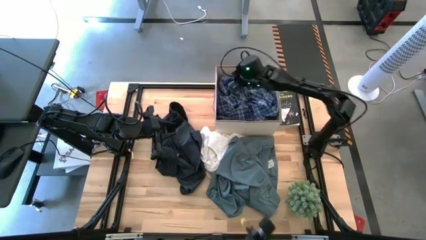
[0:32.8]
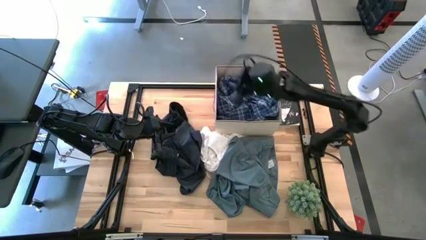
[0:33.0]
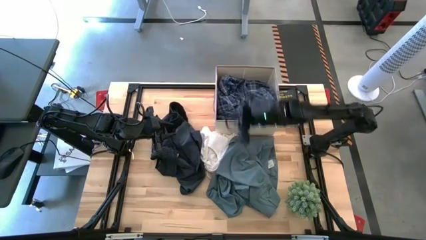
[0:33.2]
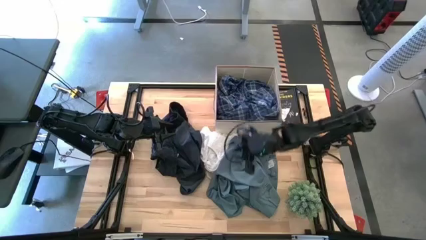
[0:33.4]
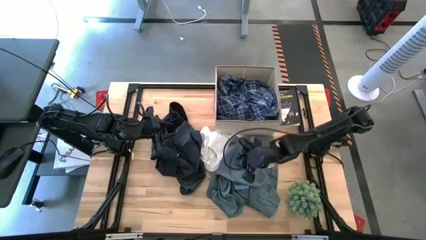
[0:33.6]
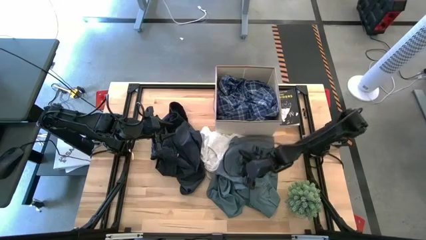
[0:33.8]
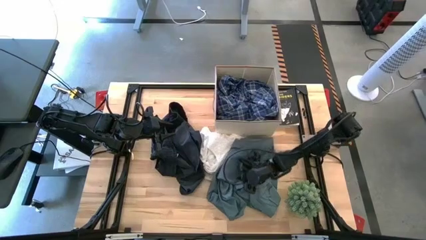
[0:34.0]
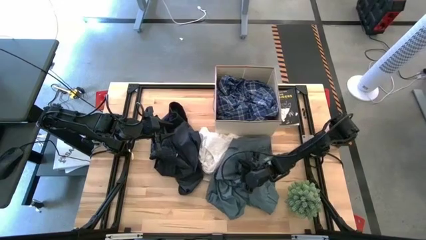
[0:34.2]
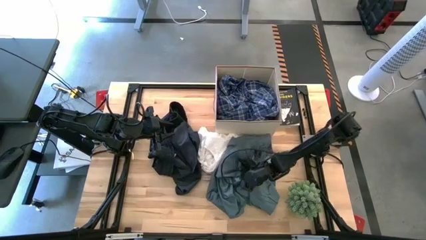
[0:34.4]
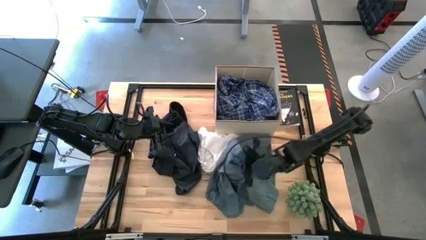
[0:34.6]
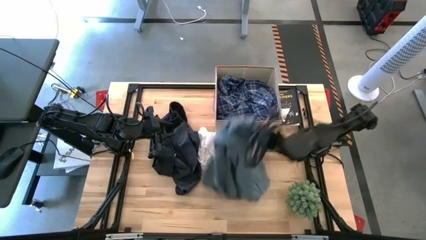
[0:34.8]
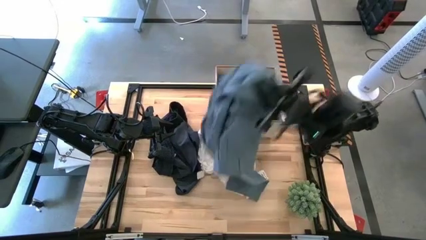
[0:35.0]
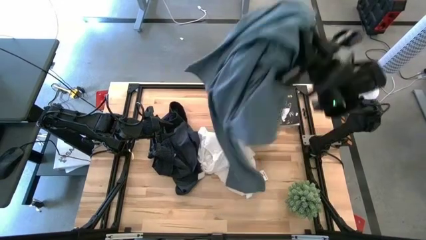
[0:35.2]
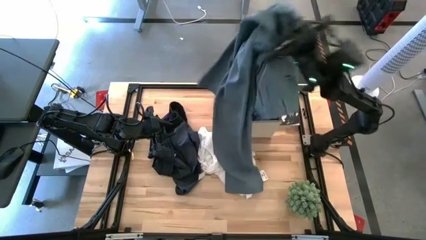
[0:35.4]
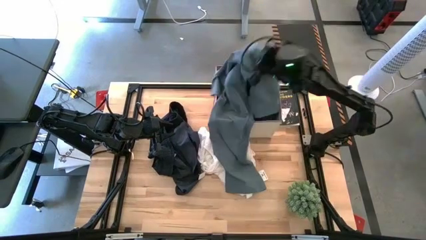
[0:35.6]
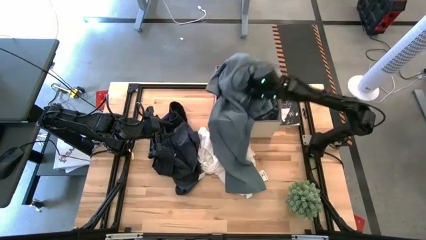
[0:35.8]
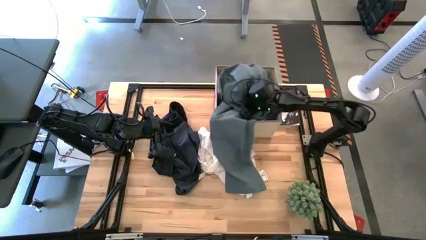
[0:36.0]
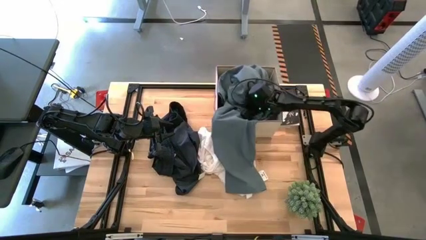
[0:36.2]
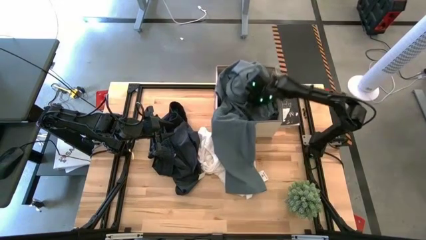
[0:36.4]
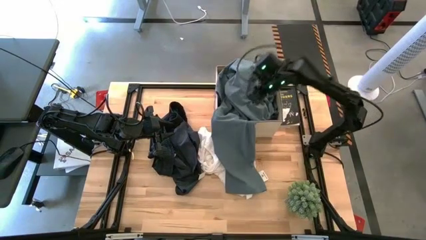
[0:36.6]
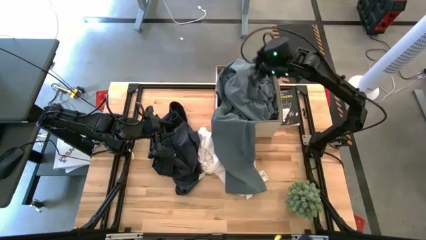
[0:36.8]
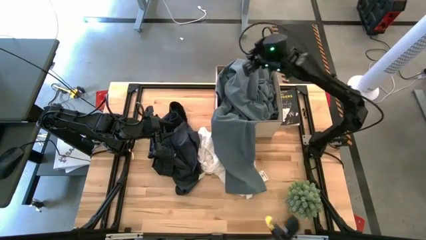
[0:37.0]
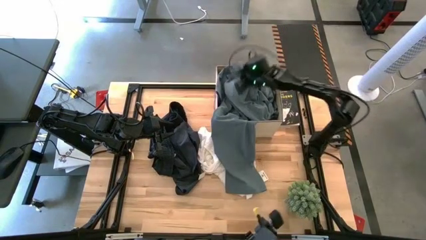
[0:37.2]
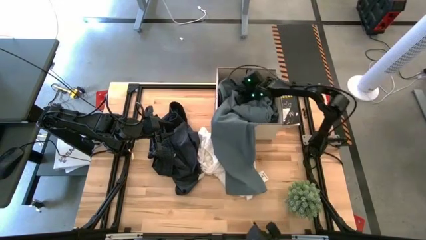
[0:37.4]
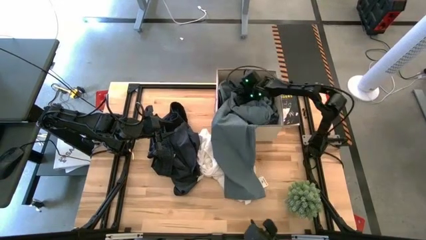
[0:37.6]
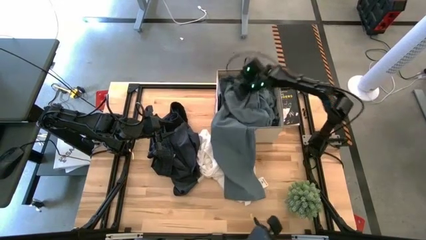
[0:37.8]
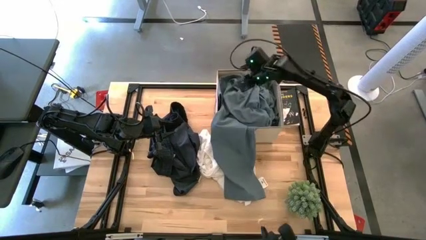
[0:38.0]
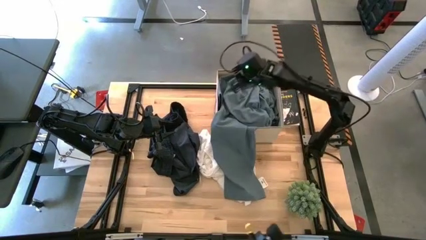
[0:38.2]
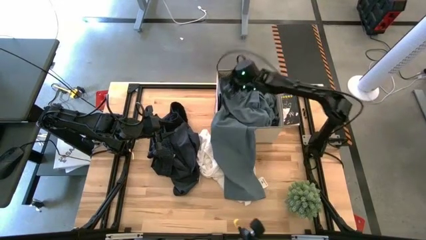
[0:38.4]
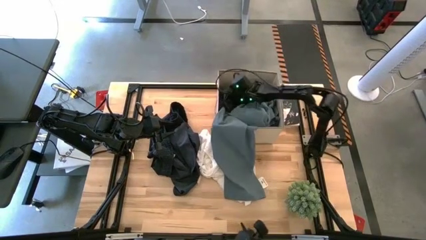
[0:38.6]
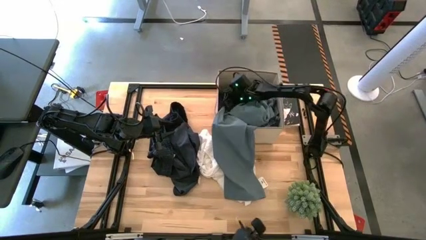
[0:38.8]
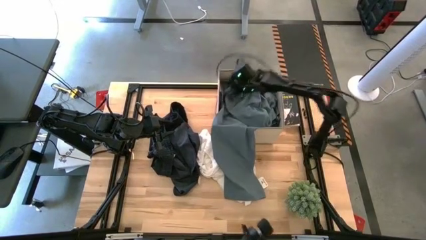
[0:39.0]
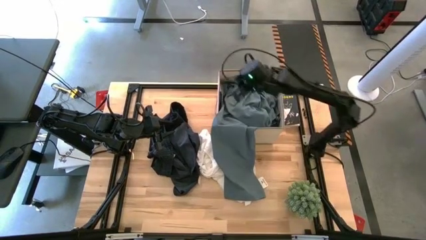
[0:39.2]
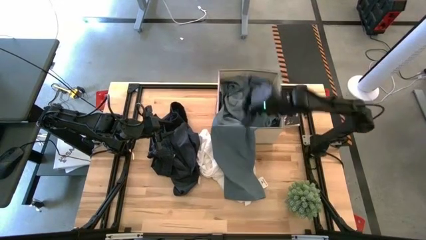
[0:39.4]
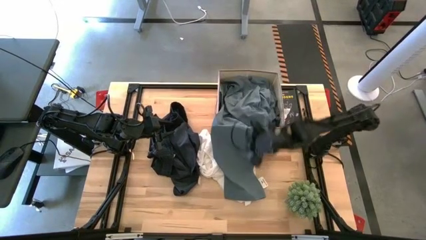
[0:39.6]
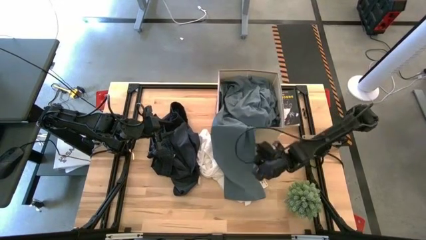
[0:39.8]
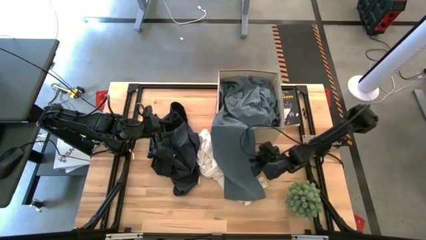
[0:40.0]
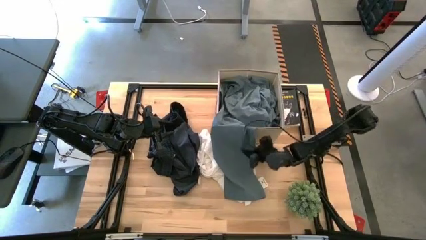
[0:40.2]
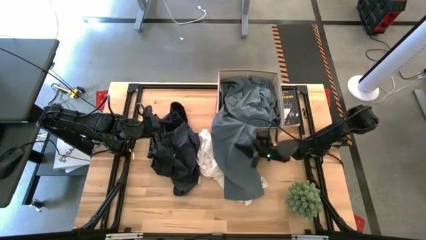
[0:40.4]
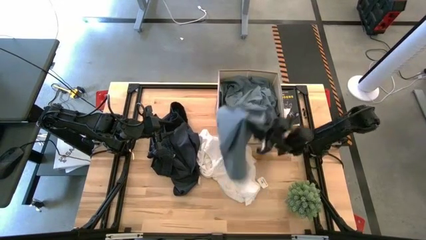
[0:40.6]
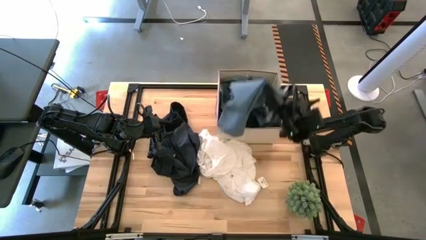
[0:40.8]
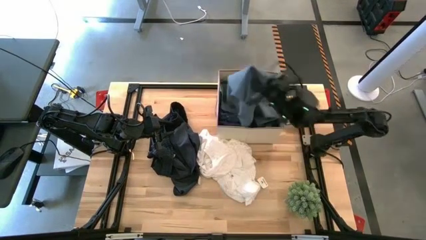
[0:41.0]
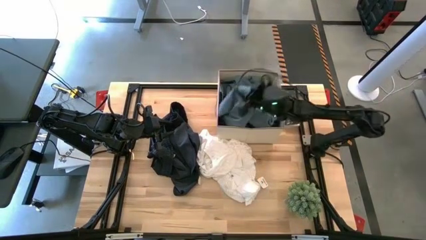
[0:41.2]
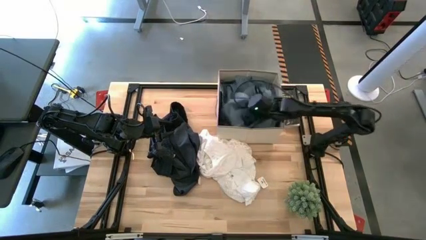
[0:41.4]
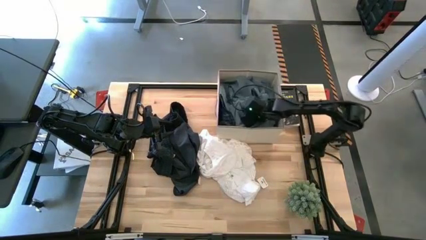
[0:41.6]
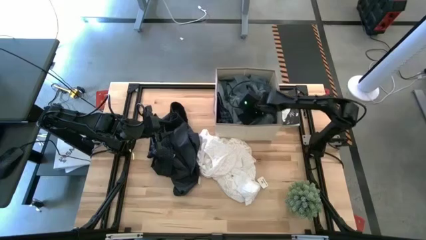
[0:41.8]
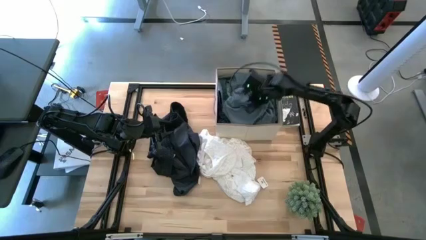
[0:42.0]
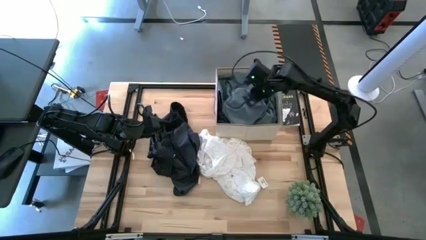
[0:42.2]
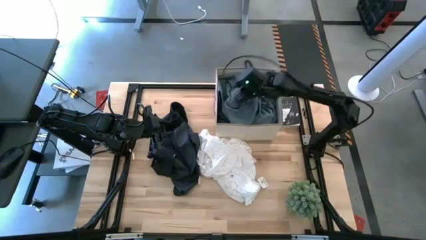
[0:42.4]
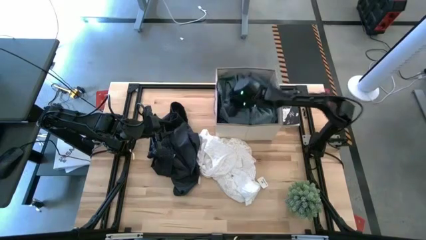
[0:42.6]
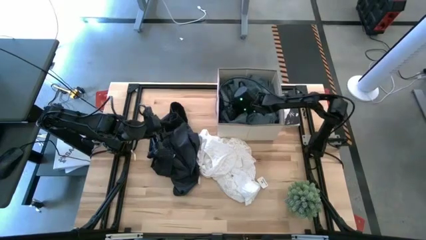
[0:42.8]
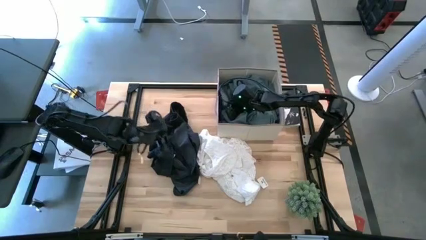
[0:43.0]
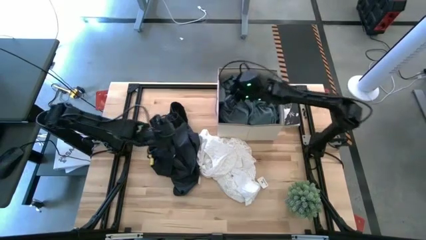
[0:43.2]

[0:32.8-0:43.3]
Task: Sort clothes
Put the gray pants into the laundry organizer
